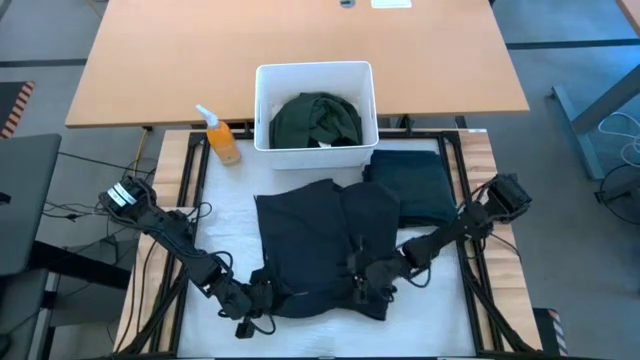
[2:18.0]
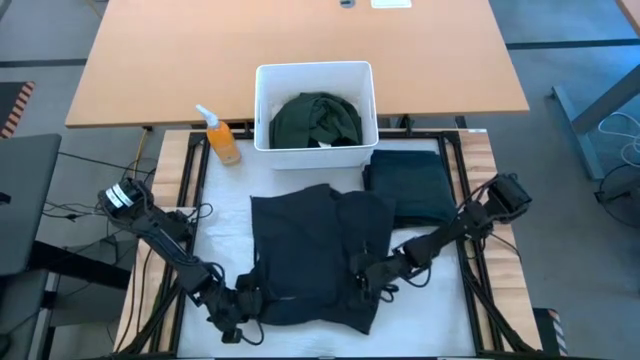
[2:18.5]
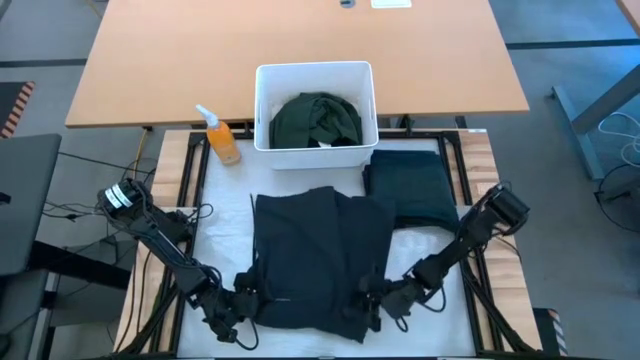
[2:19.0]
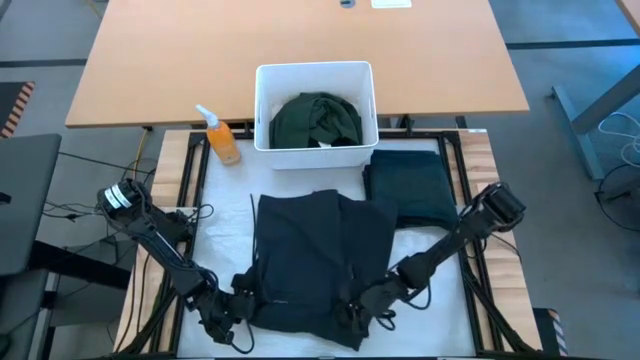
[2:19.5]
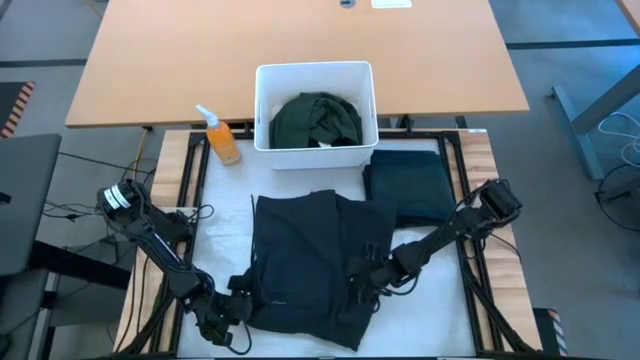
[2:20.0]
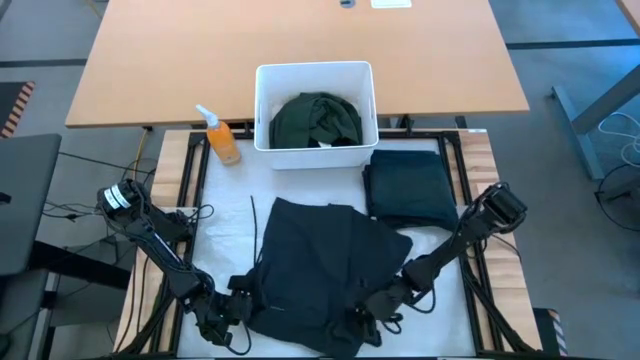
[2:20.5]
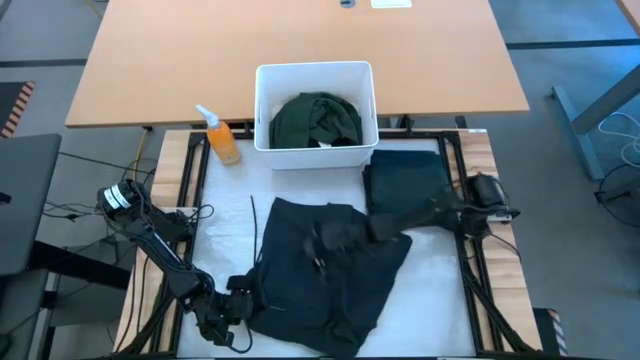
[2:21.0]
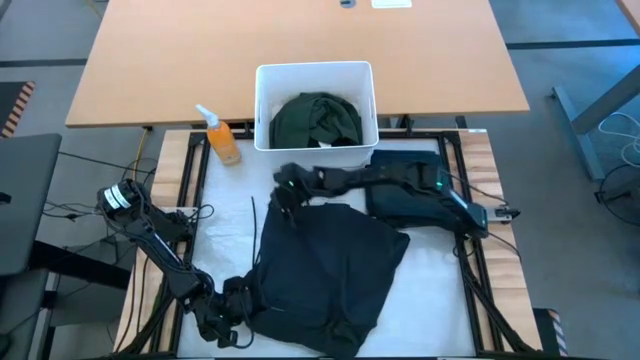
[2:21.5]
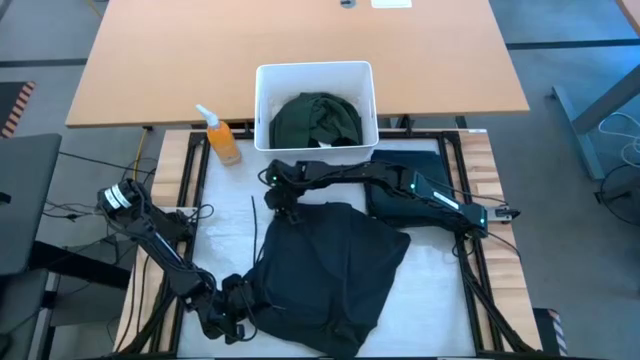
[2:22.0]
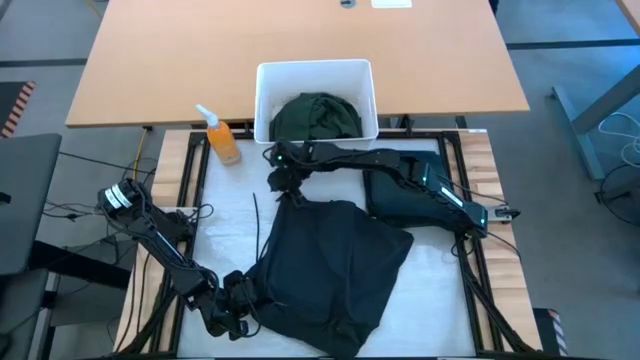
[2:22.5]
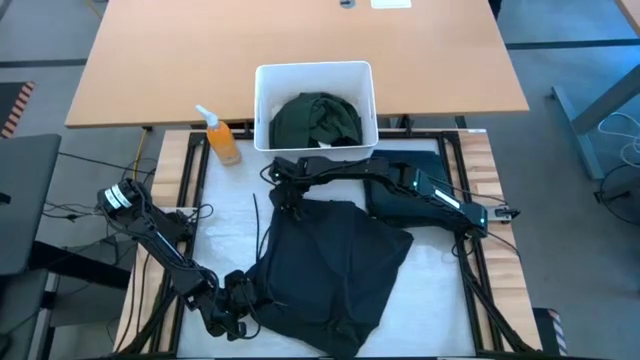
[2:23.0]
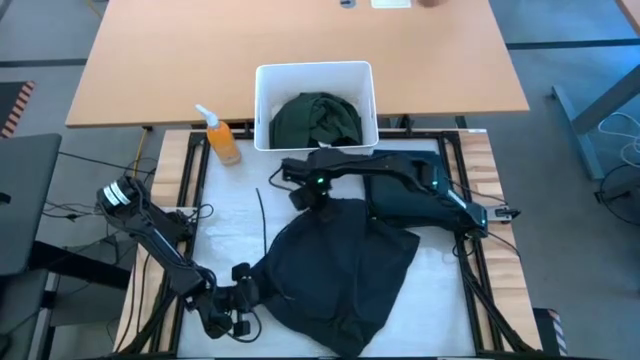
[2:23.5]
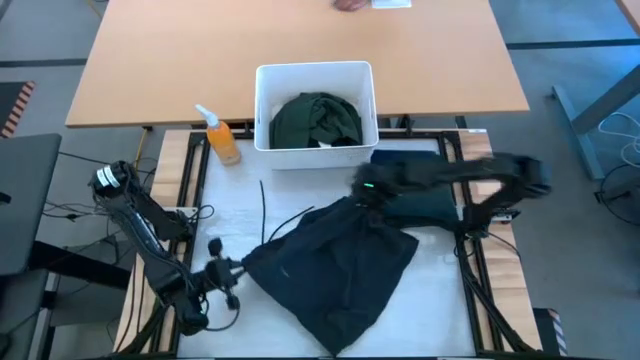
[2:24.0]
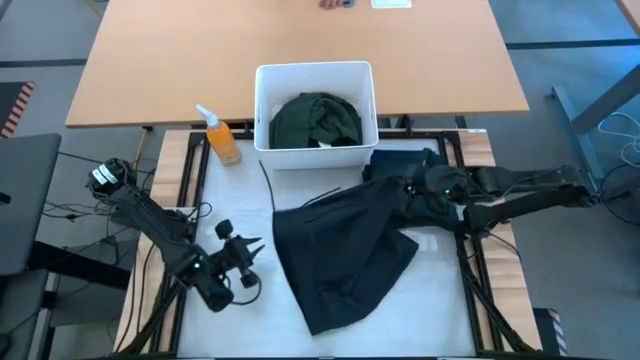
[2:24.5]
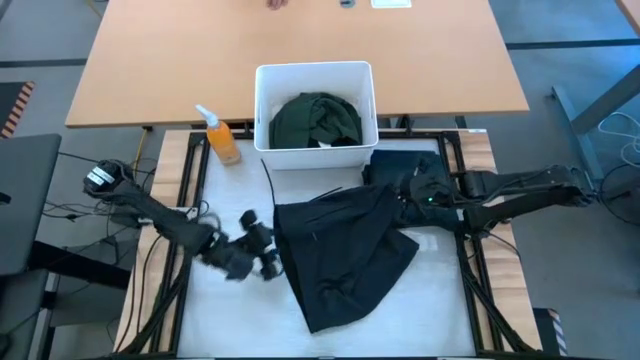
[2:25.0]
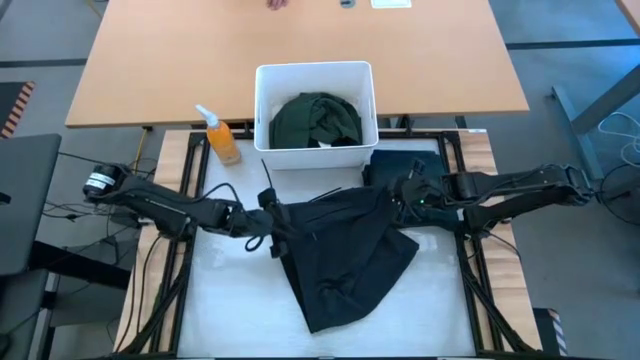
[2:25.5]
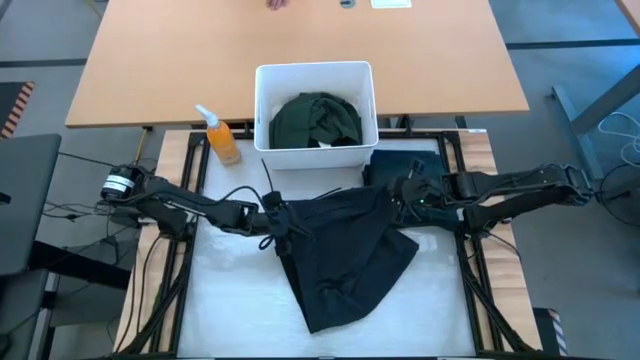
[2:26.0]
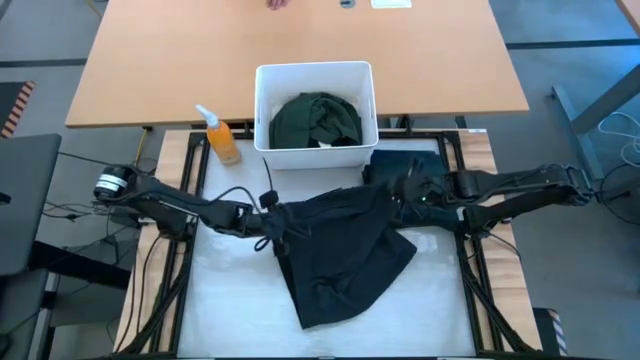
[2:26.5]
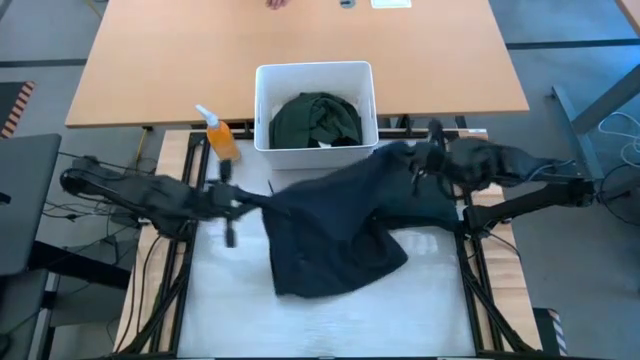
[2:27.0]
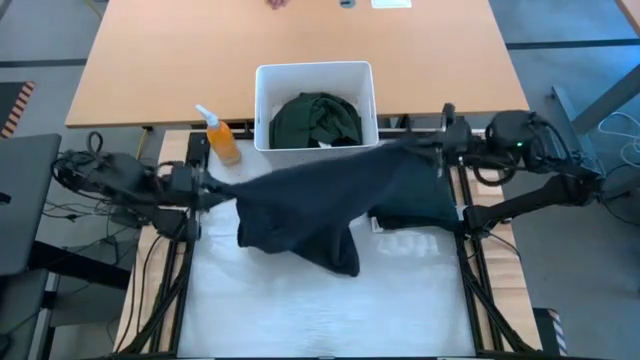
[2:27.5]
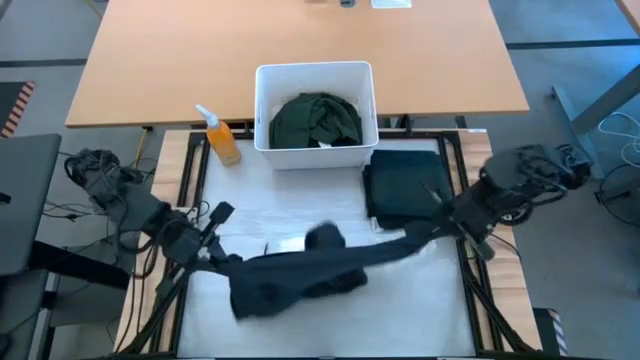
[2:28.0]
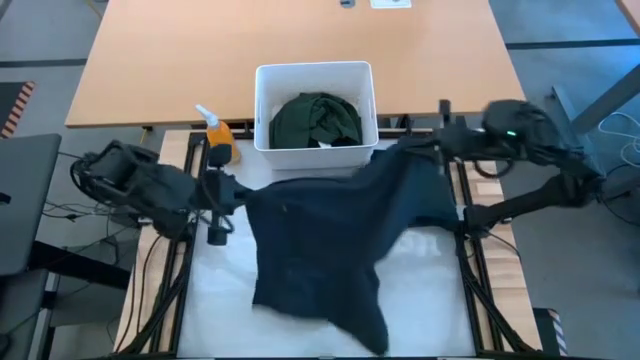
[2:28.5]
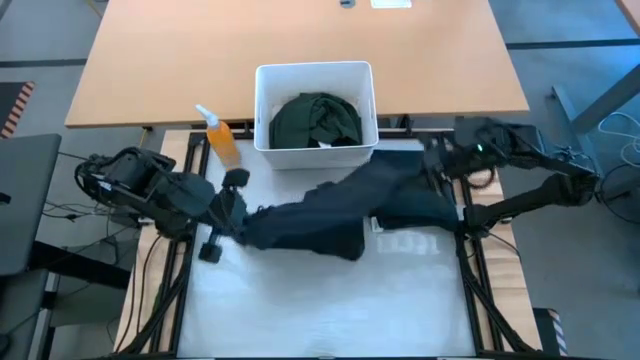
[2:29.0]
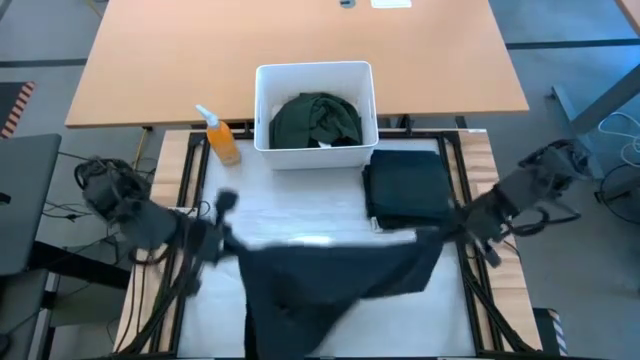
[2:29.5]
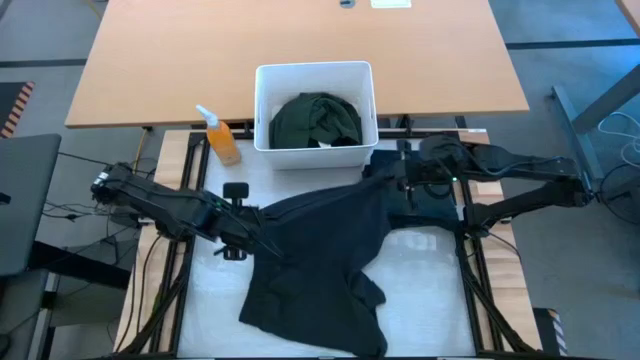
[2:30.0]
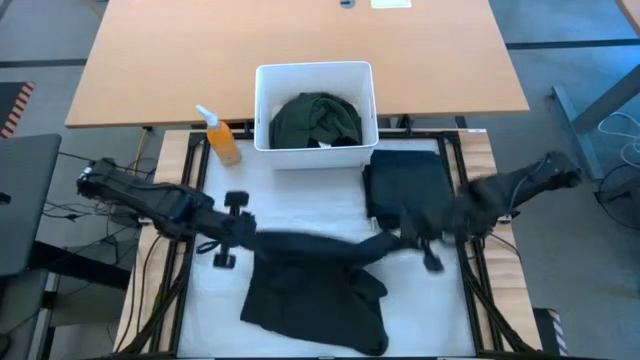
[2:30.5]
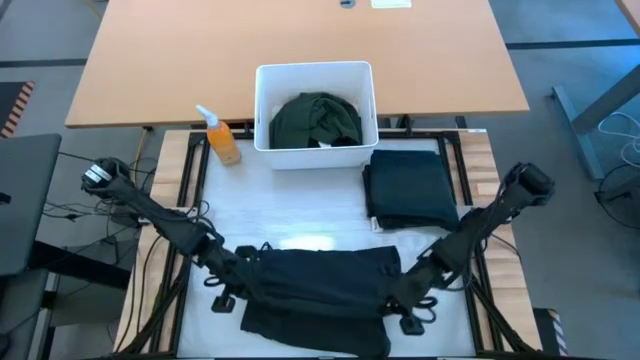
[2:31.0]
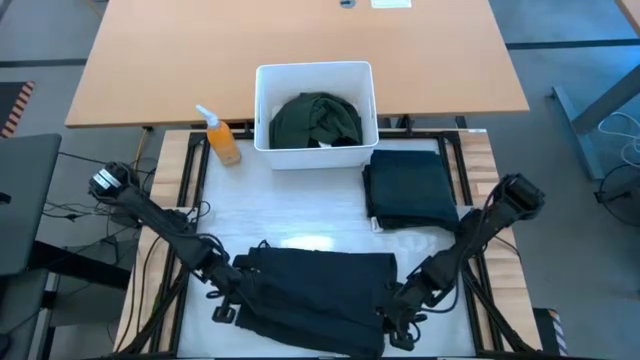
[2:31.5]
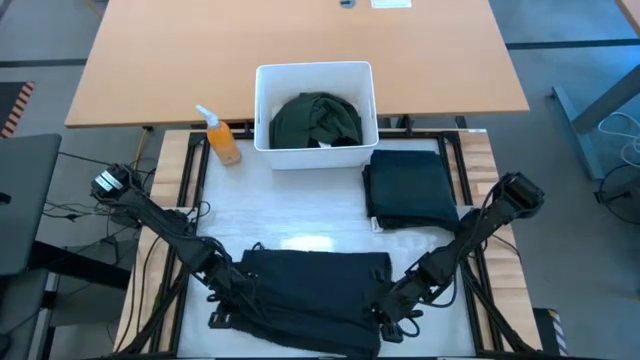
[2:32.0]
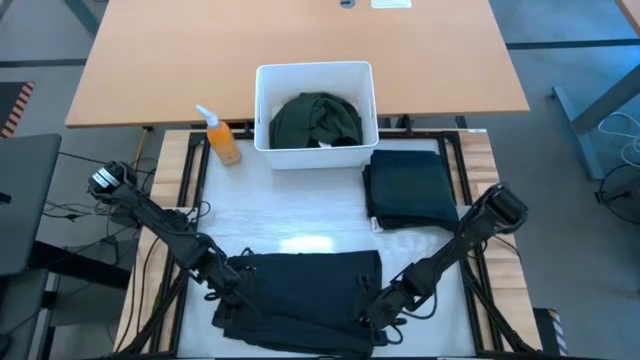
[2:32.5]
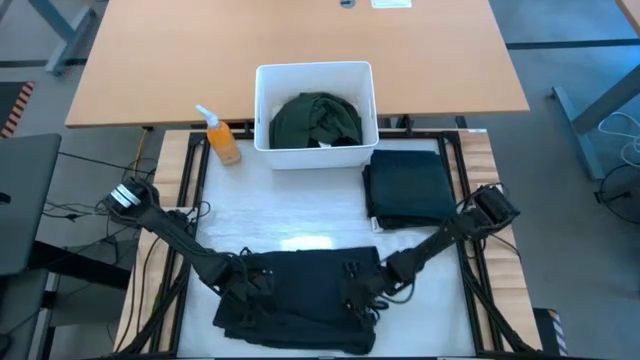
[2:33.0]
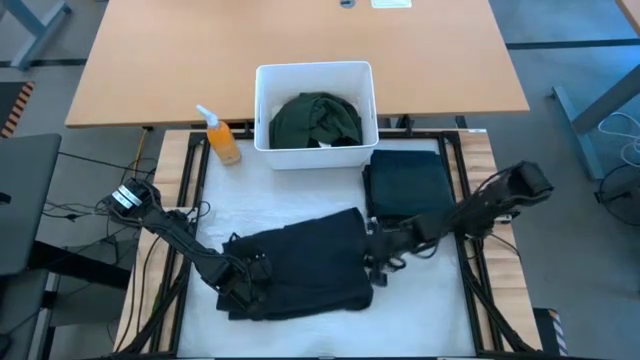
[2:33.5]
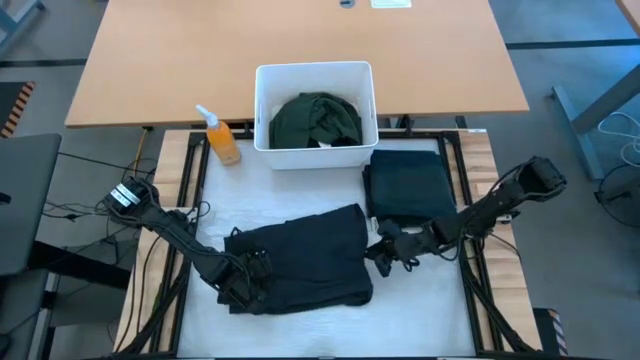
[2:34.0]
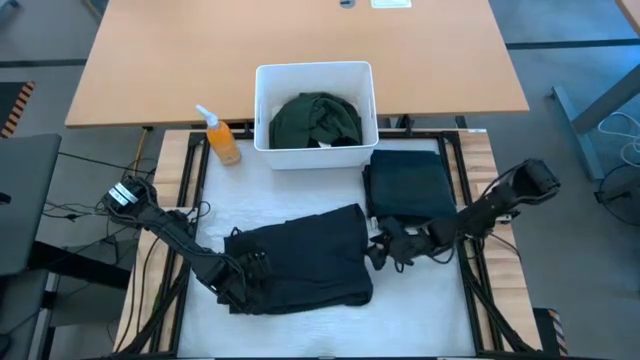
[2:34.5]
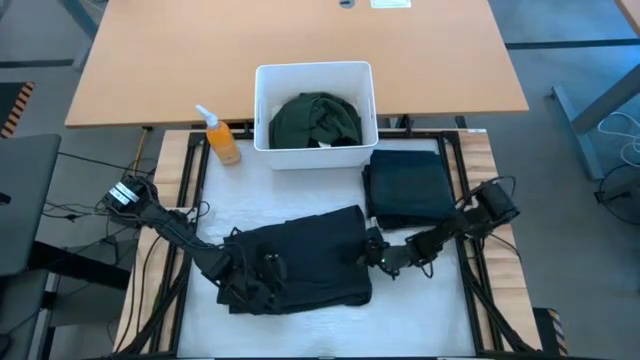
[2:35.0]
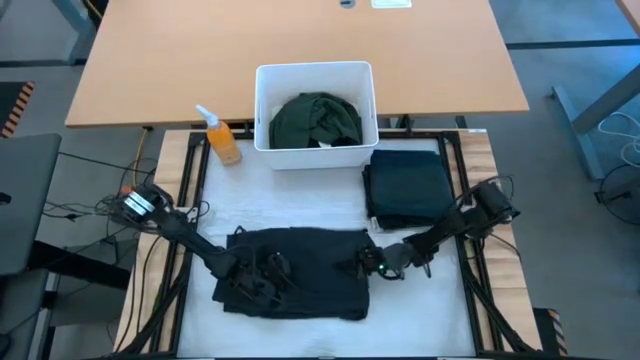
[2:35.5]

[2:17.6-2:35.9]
Task: Fold laundry
Fold the black shorts from the white laundry organizer

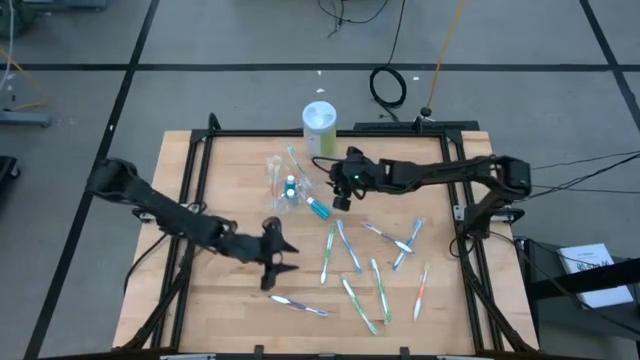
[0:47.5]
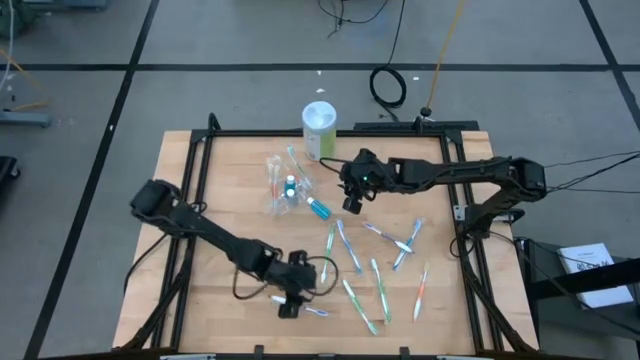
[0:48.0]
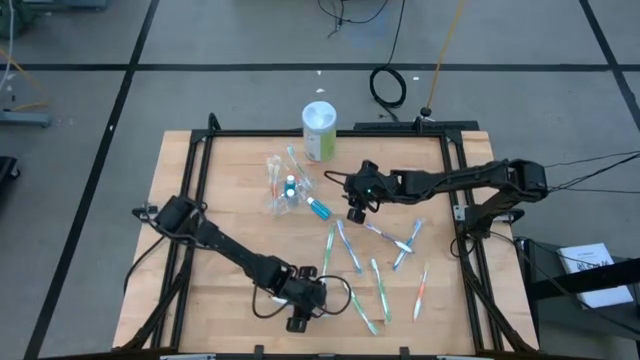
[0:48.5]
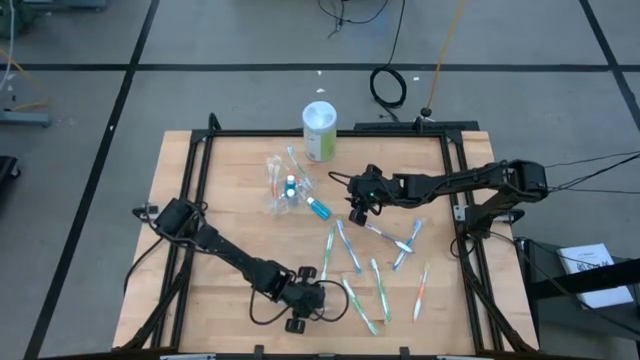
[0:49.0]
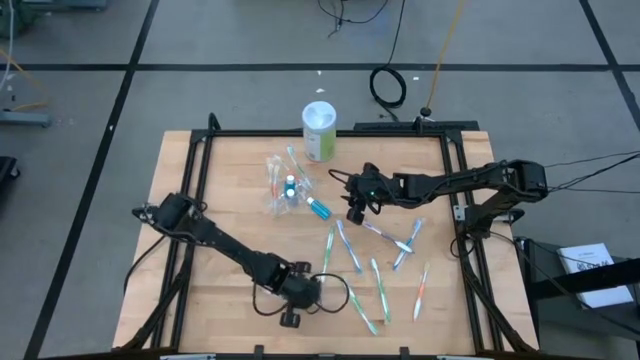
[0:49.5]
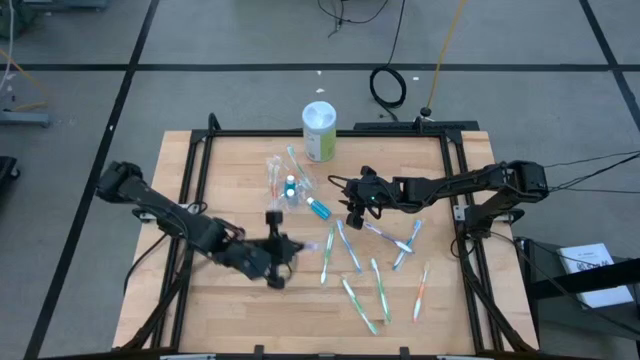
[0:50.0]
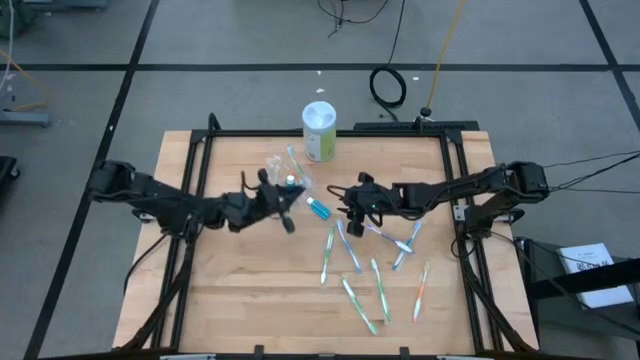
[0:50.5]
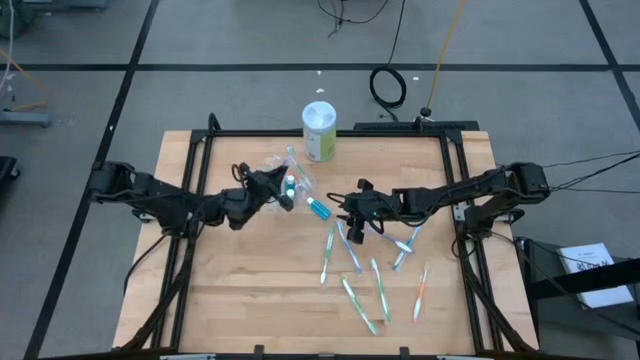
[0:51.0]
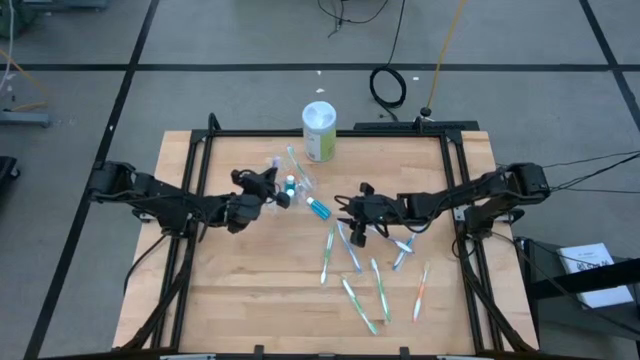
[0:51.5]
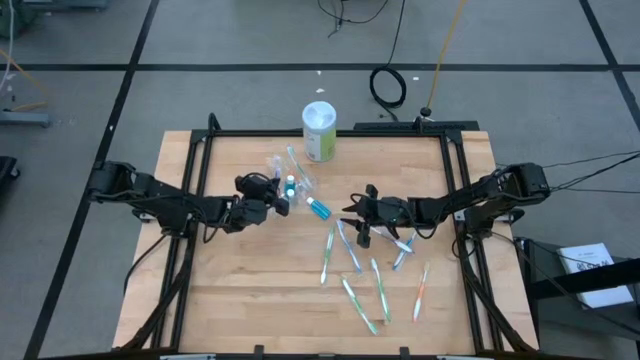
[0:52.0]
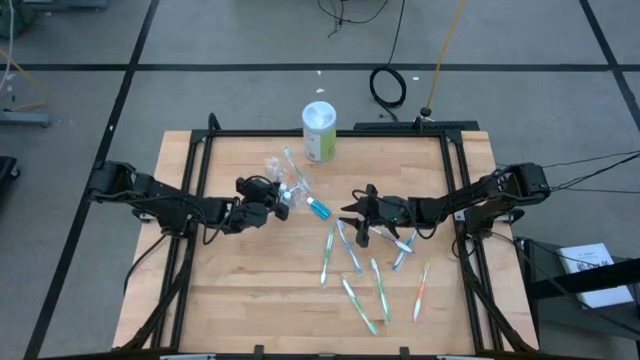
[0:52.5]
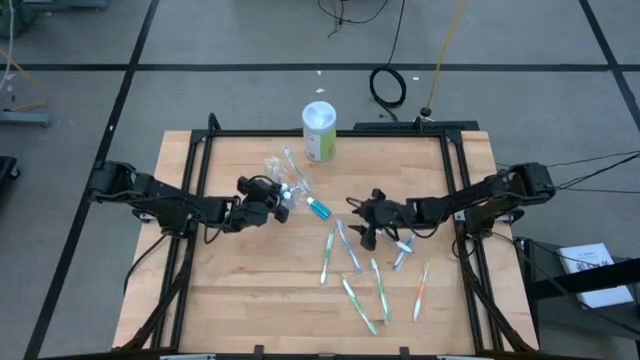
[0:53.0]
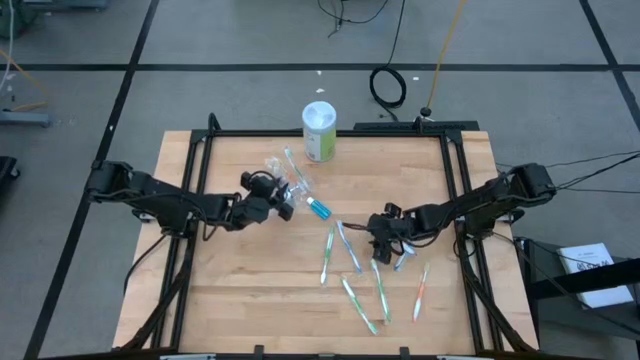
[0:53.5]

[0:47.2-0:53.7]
Task: Pick & Place toothbrushing station
Put the purple toothbrush into the transparent organizer
